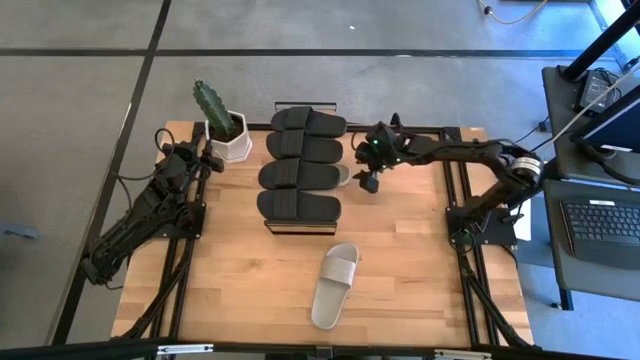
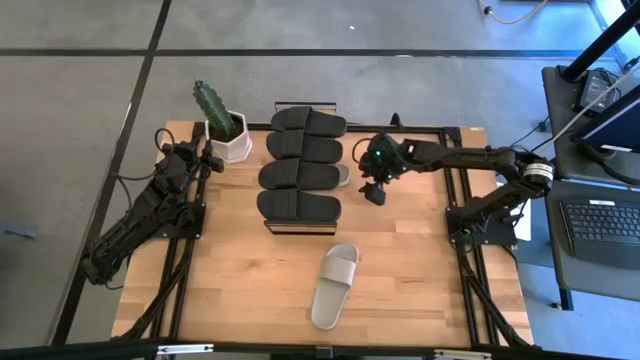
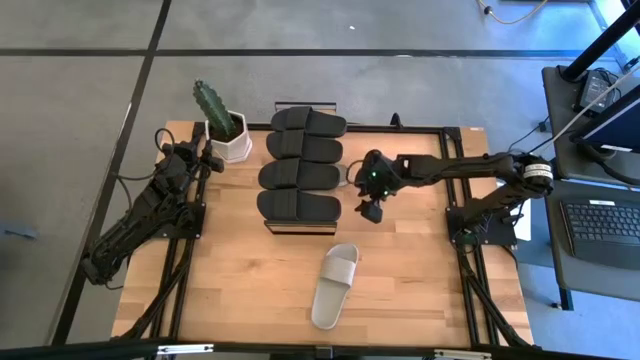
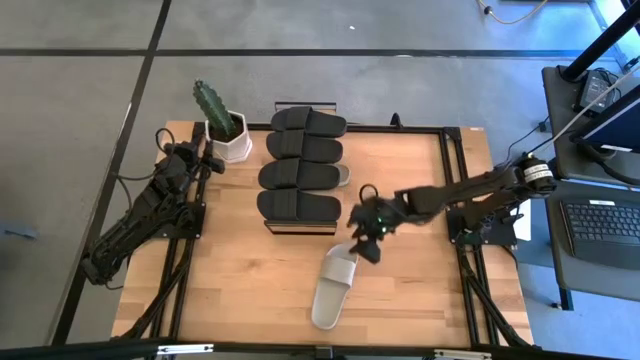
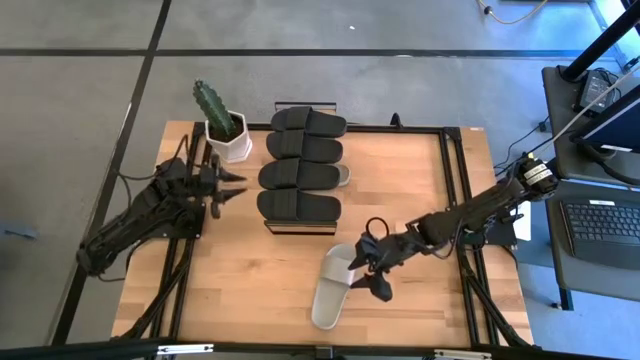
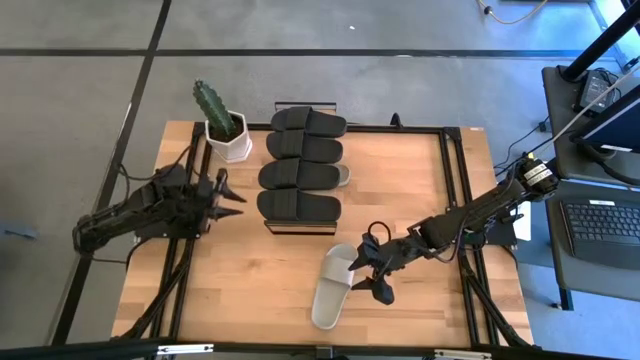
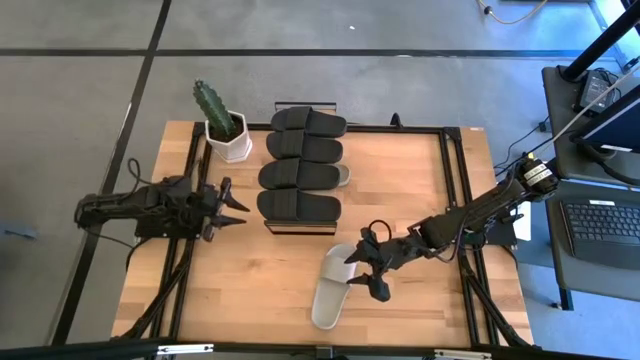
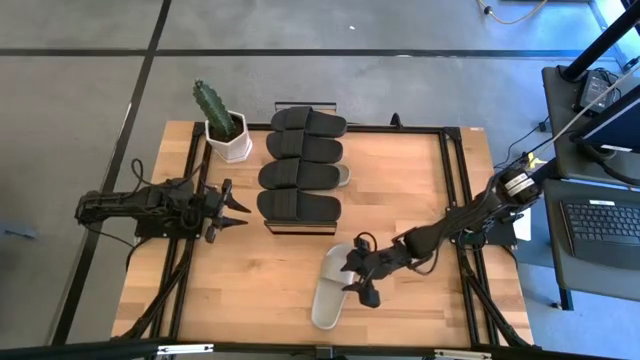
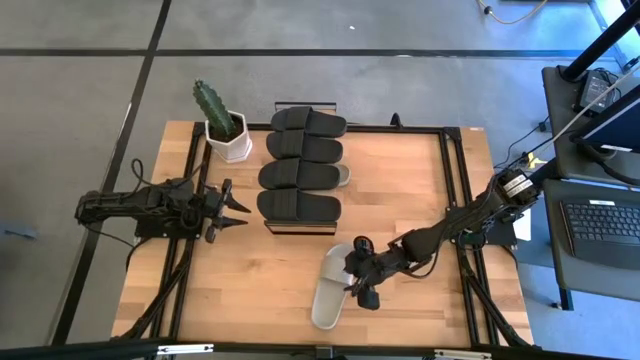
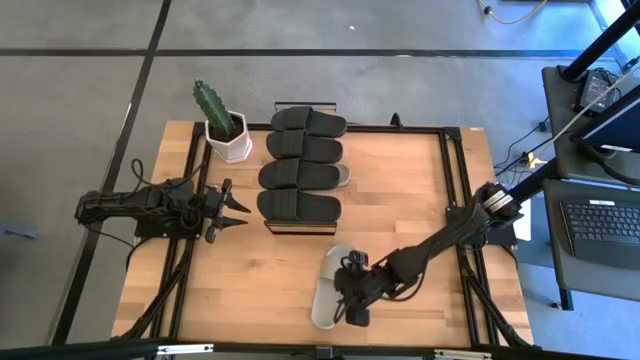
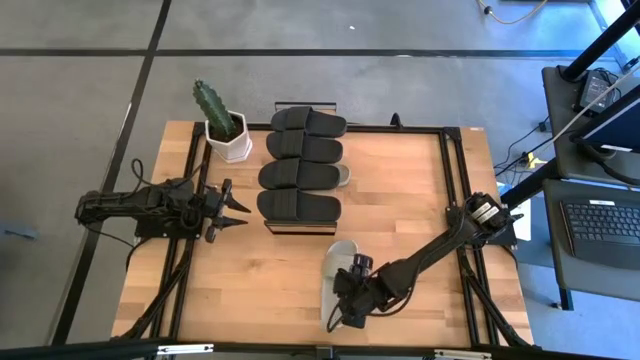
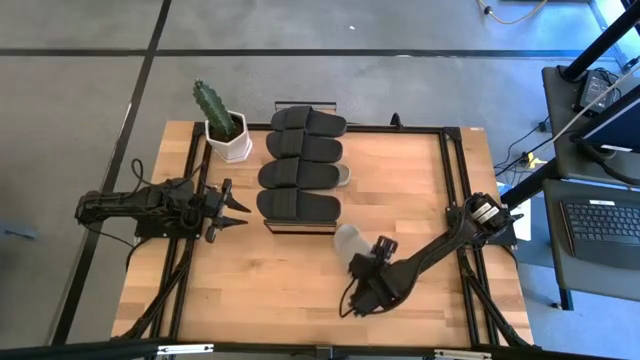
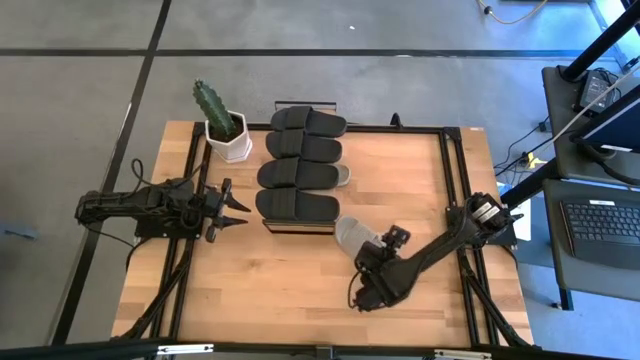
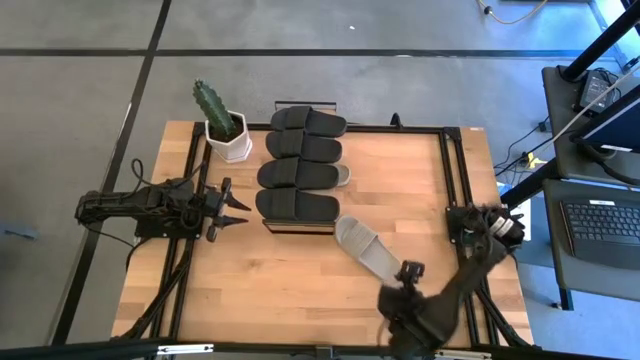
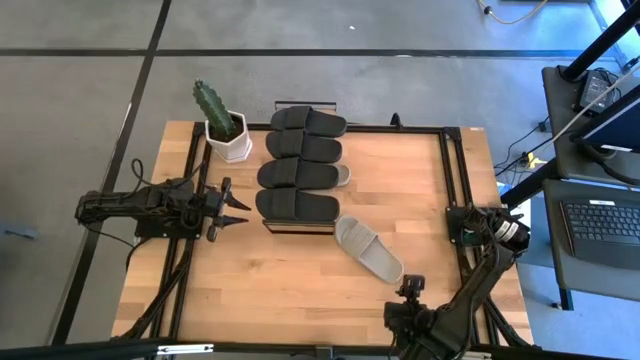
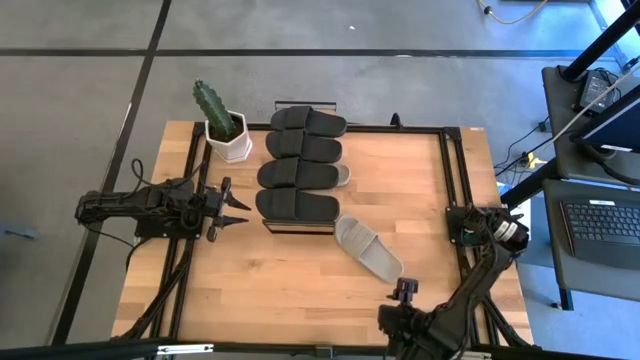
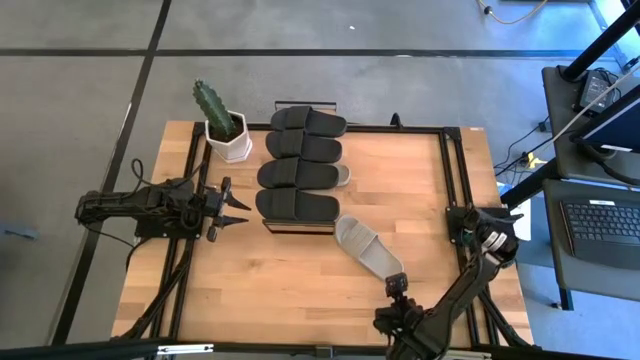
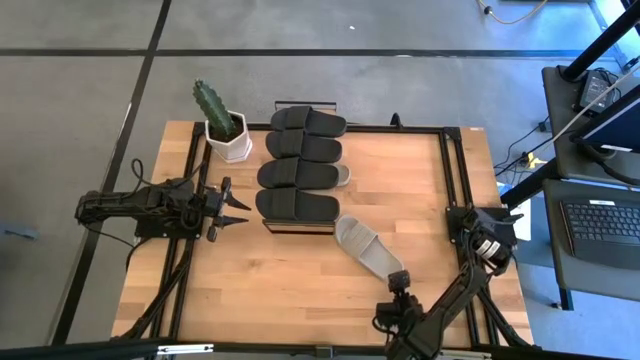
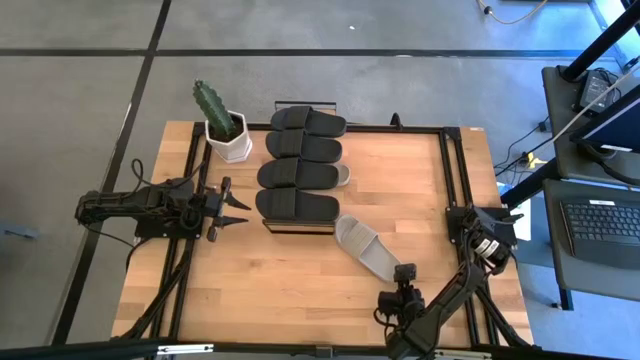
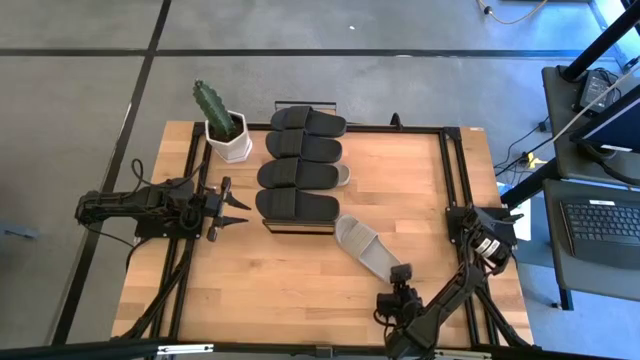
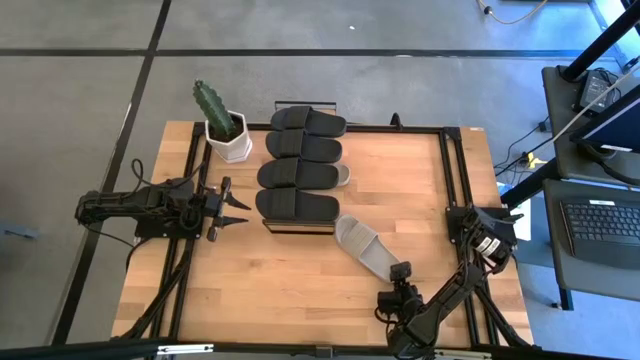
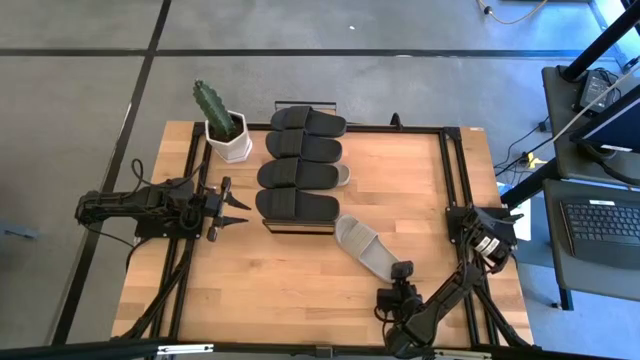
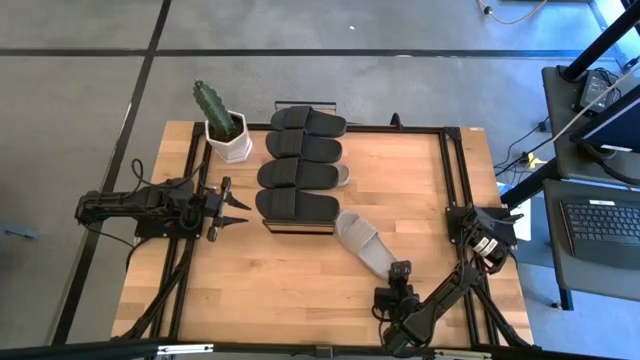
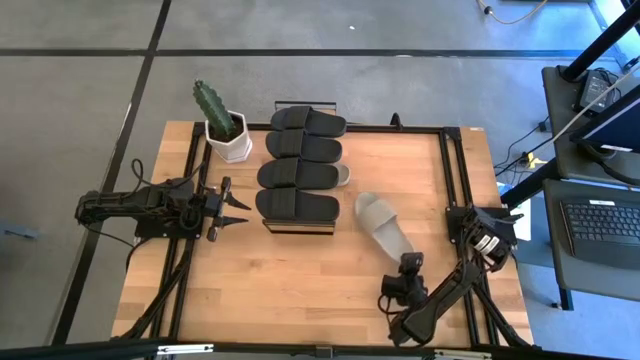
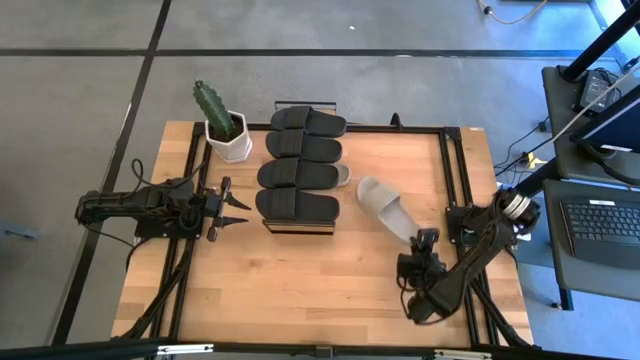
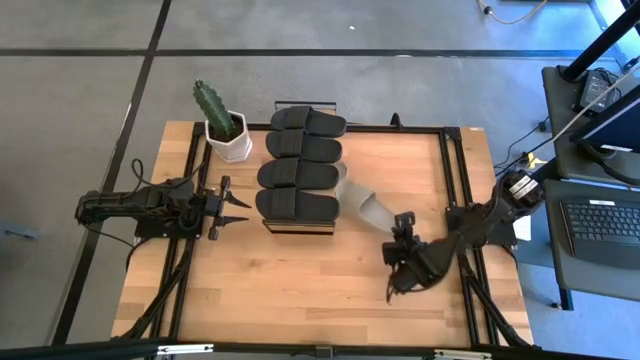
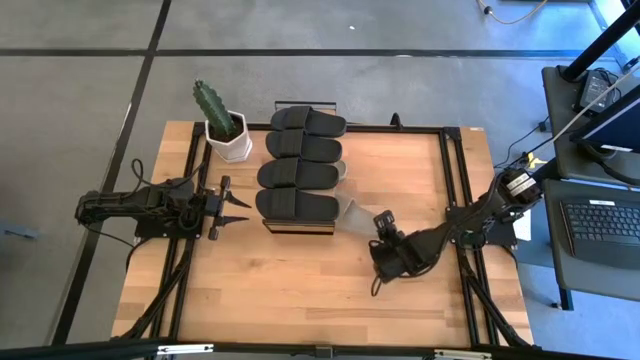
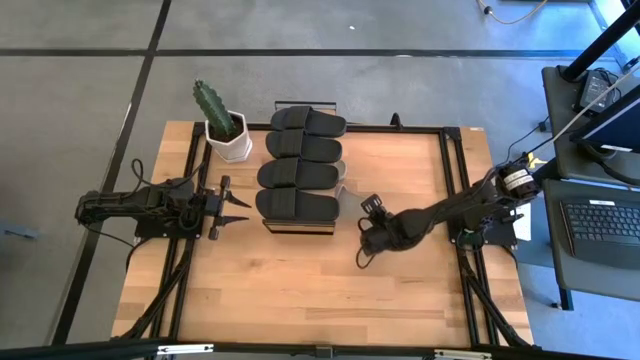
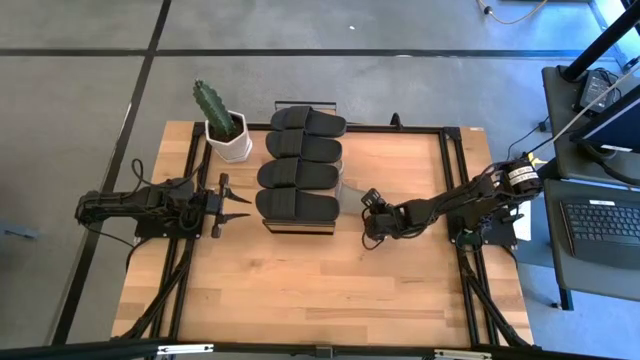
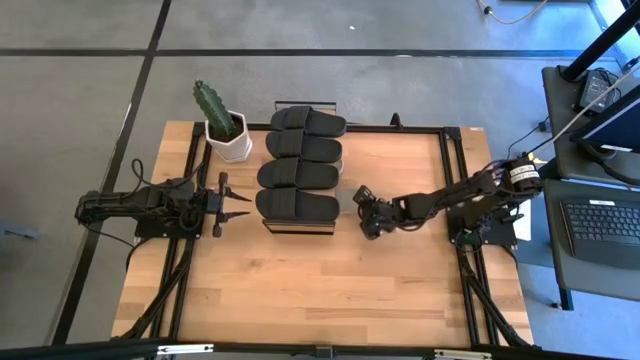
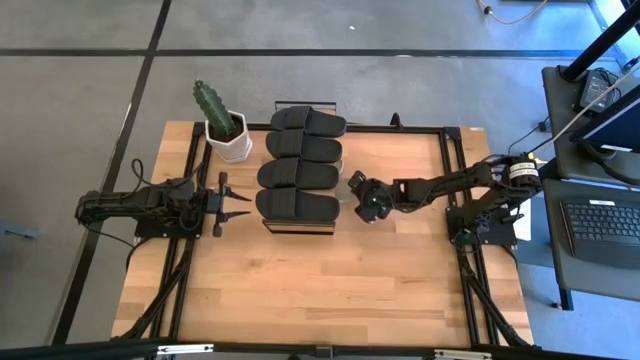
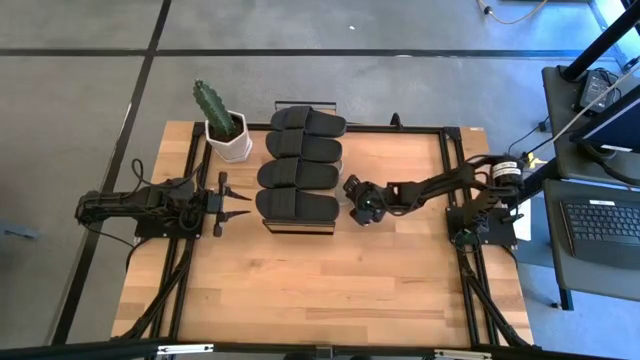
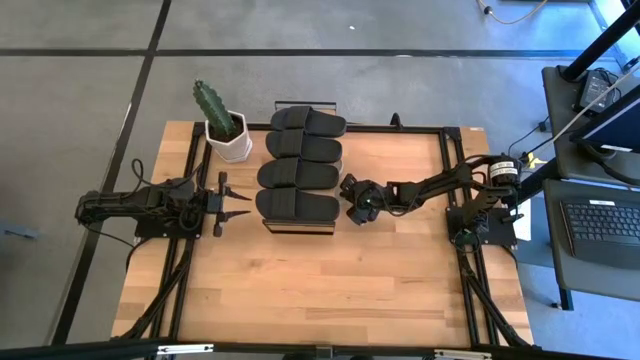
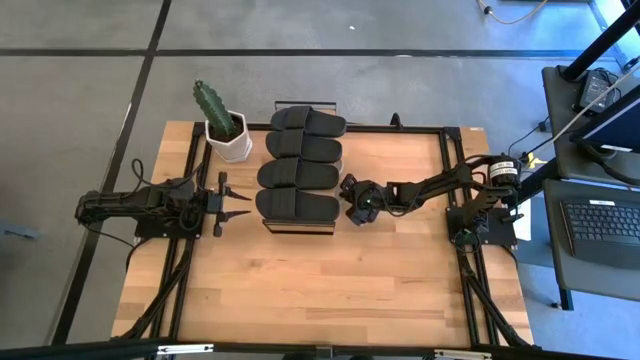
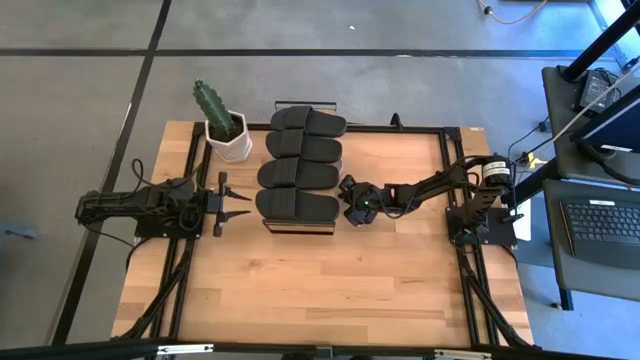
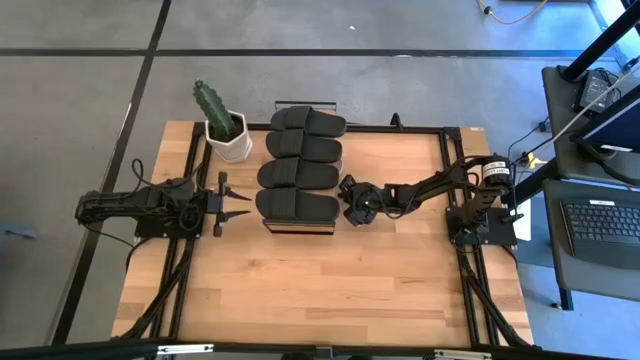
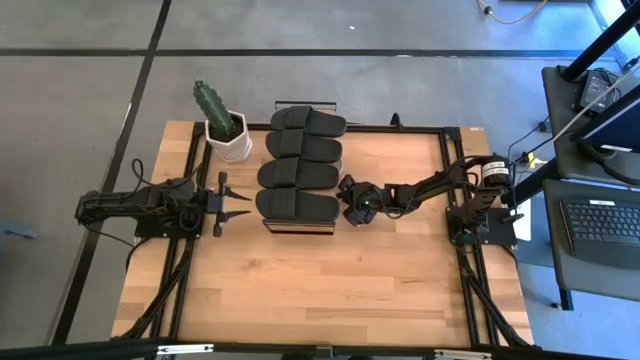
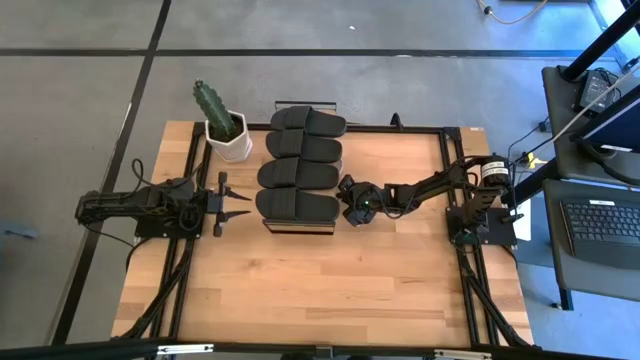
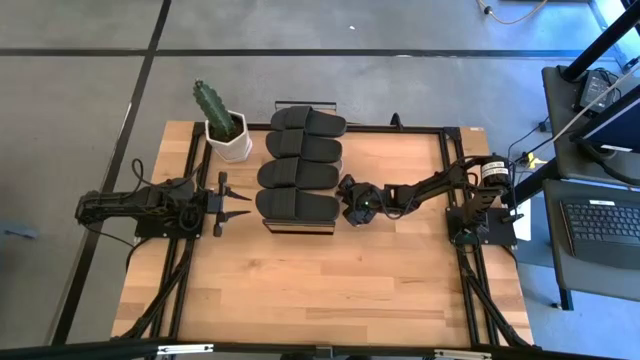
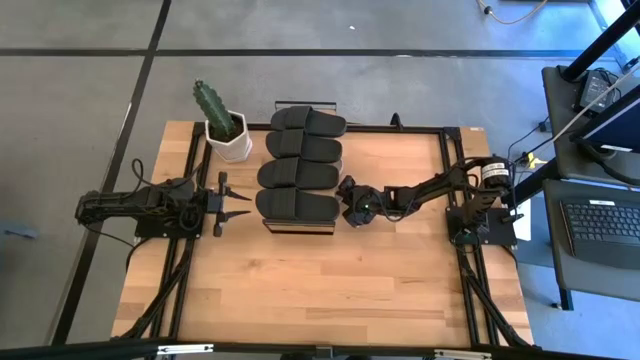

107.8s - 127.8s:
Task: Pick and place slides into the shelf
Put the white slide under the shelf

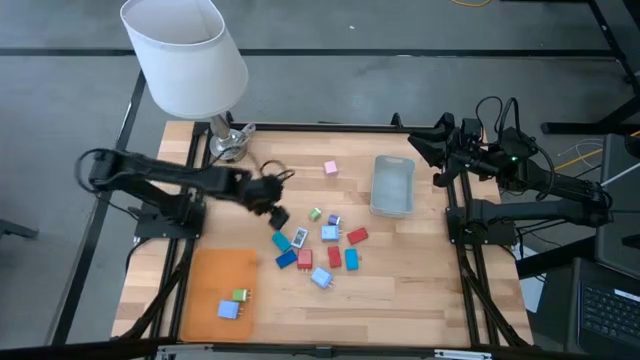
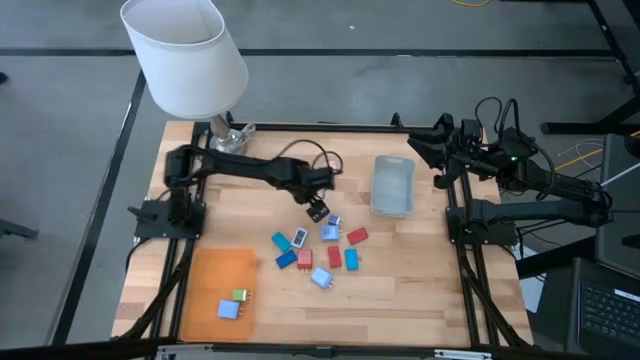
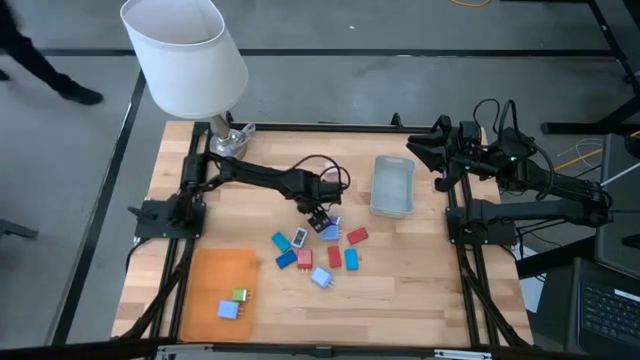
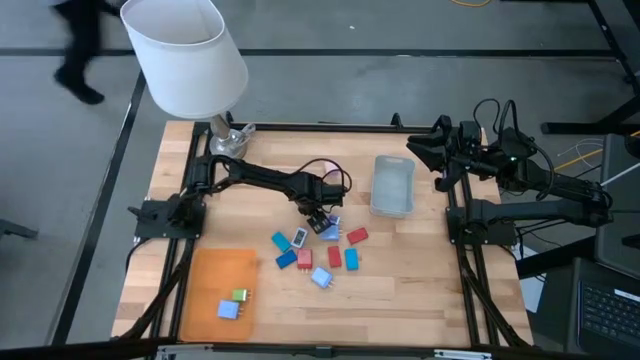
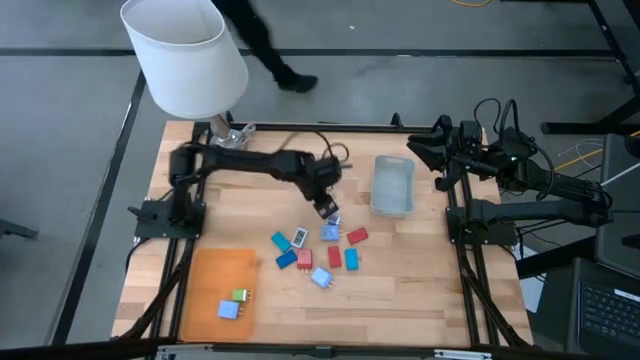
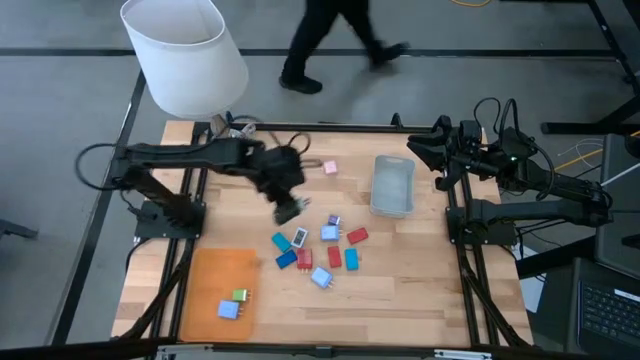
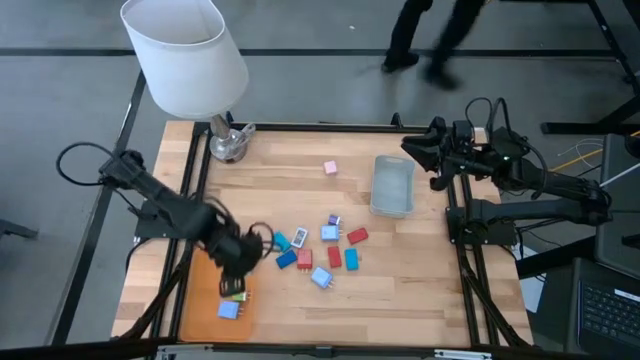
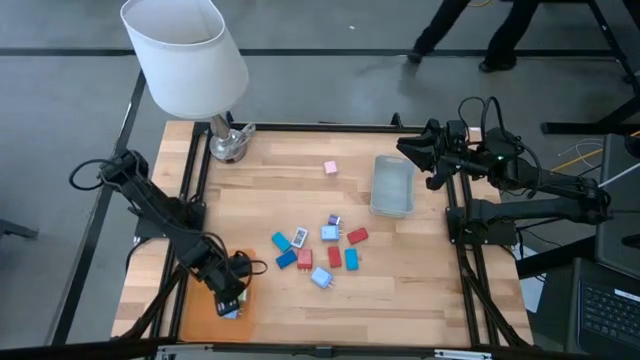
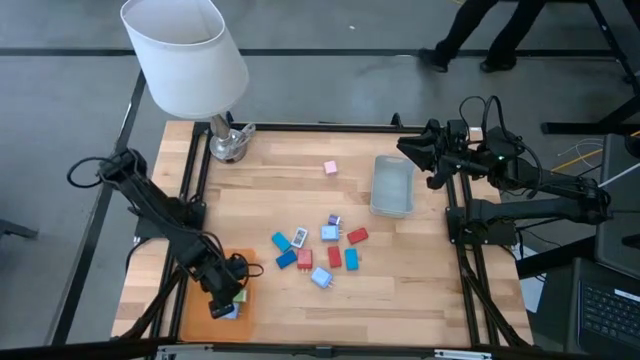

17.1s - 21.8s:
Task: Pick & Place Office items
Put the green charger adapter into the orange bin
